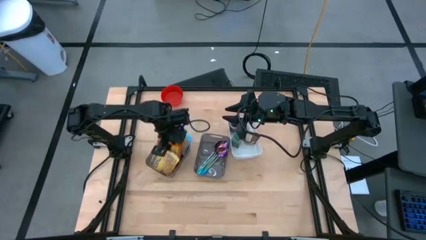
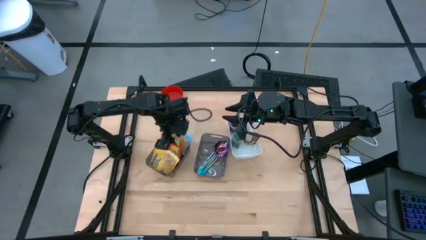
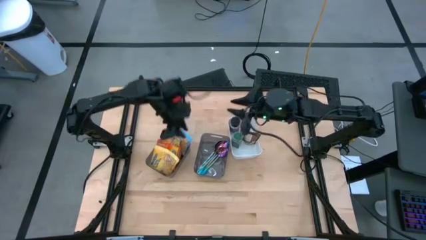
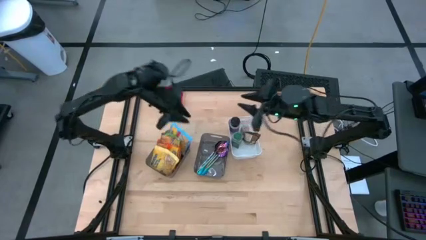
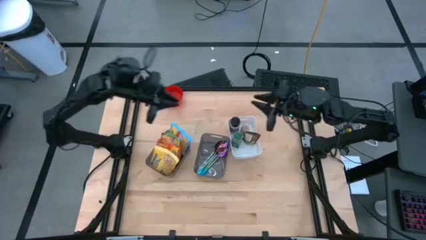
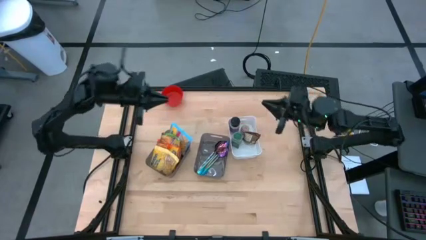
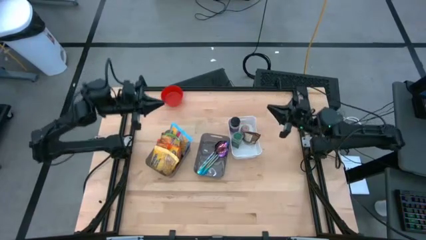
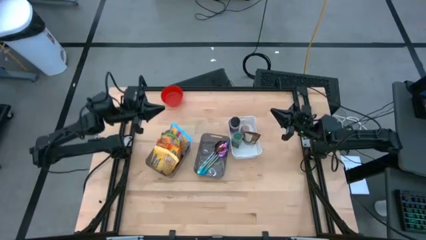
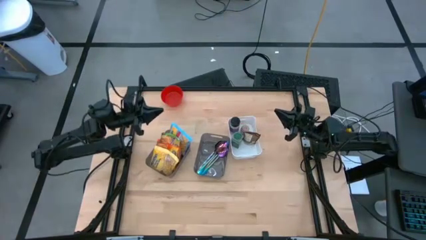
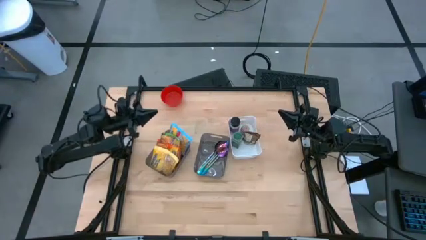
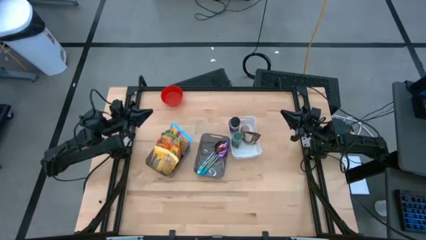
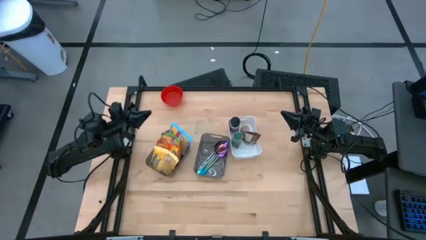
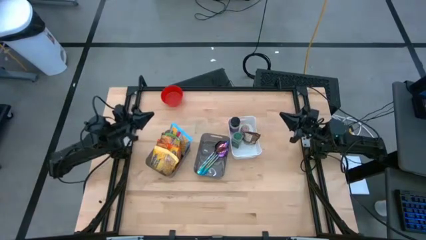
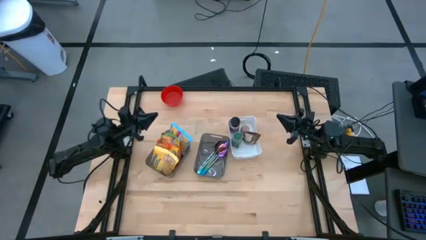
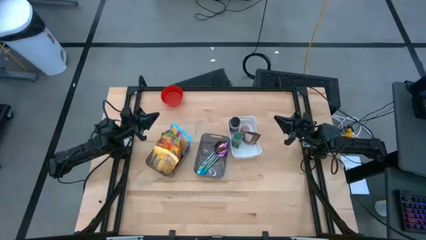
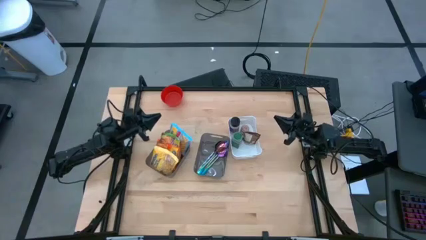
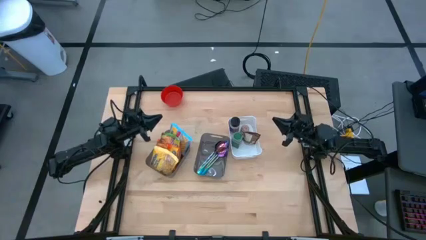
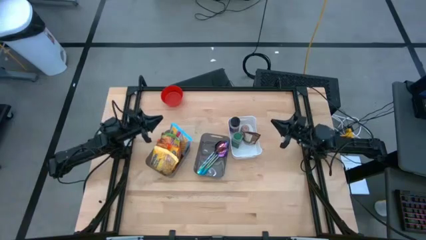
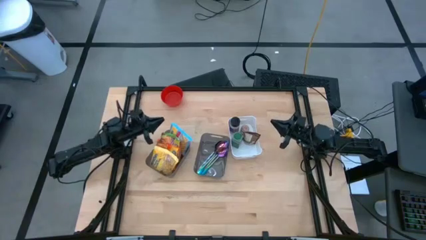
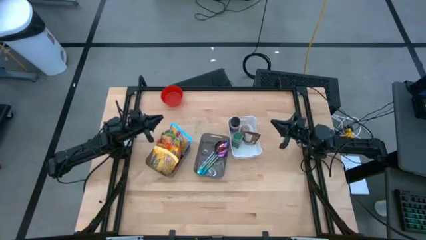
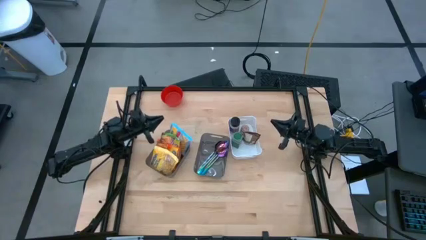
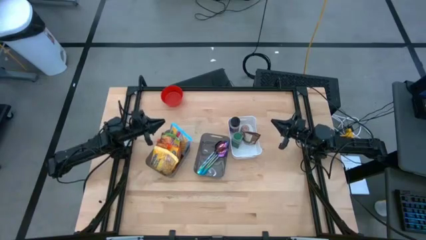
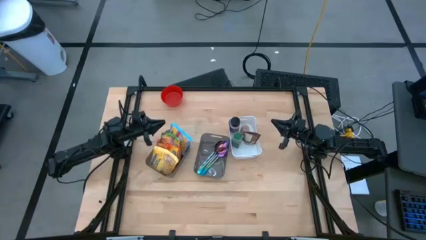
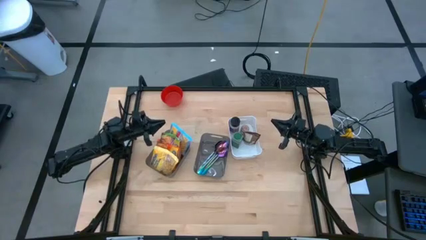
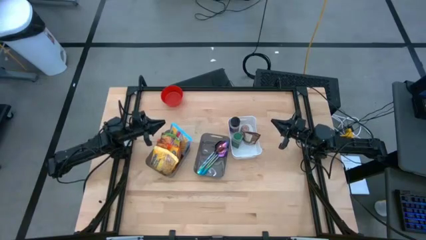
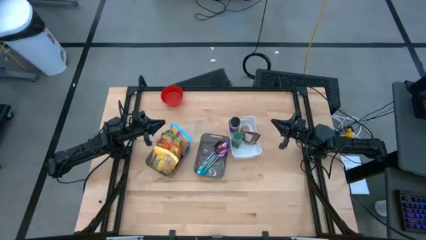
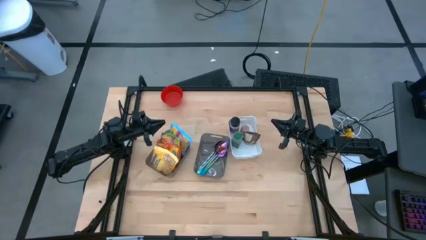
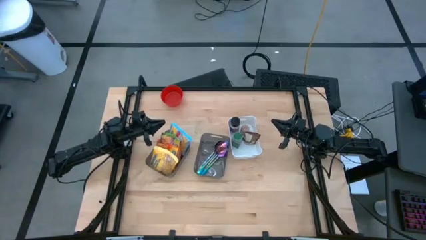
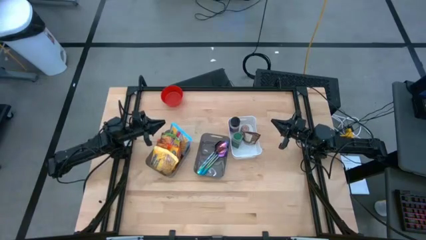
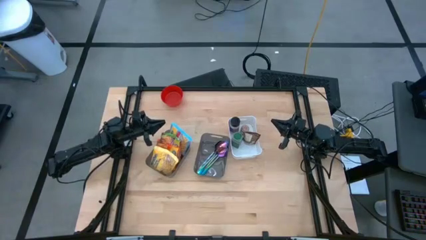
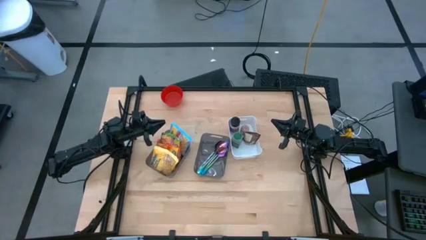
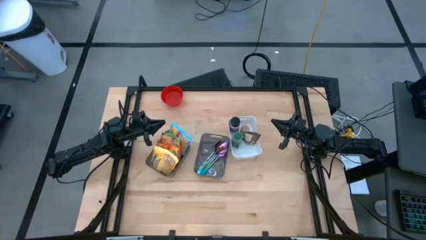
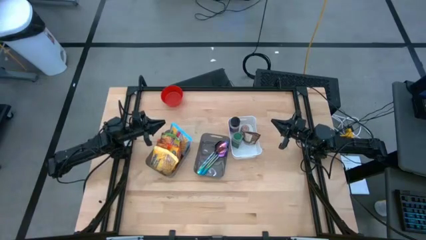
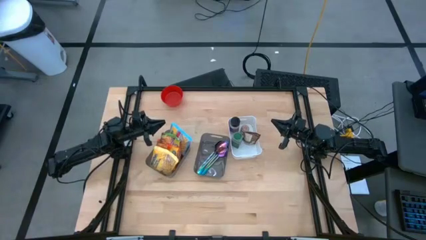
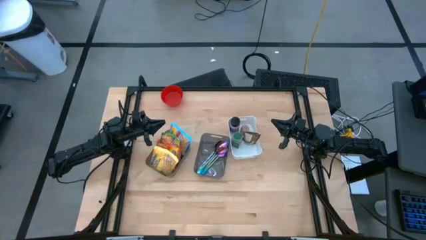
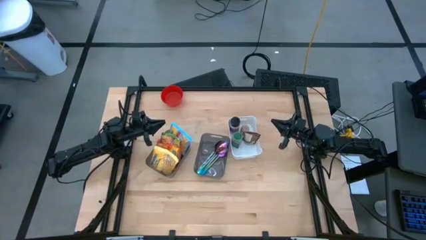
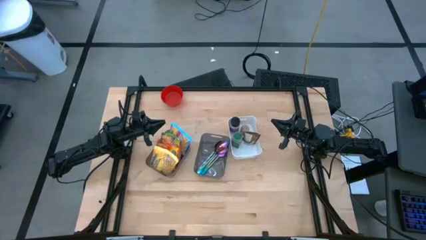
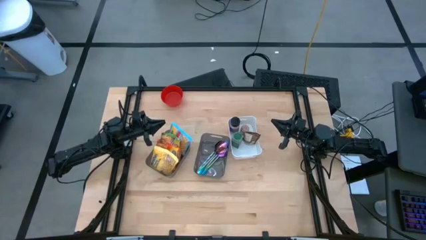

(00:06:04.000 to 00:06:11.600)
Task: Pick & Place Food Item
Return to Home Position

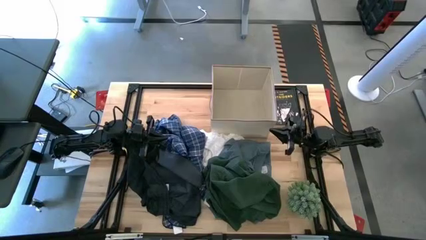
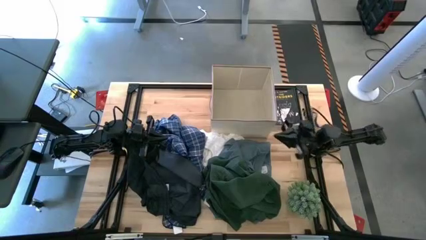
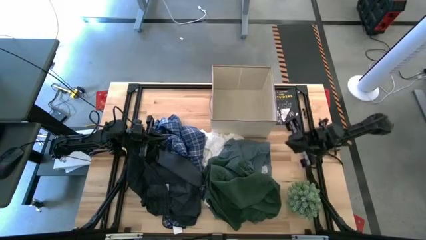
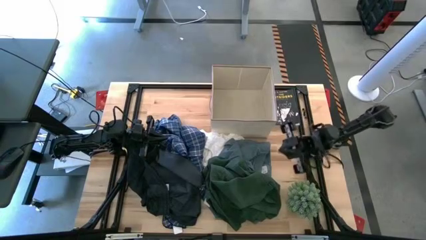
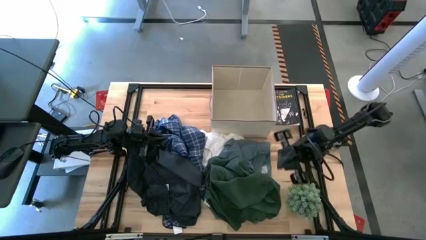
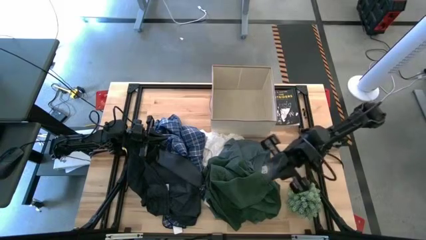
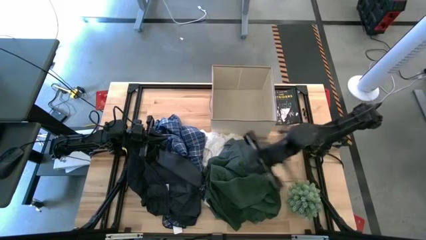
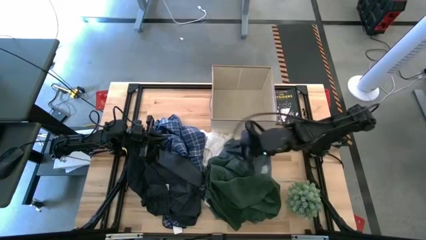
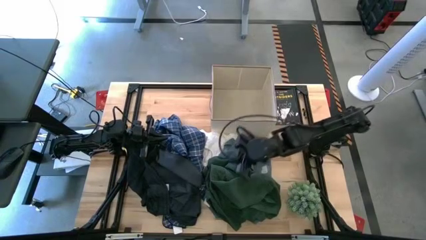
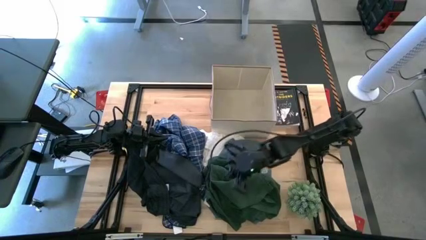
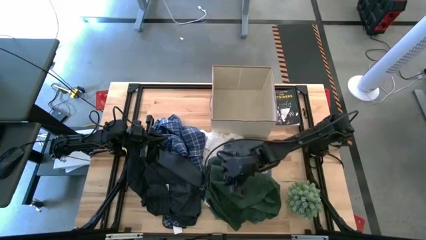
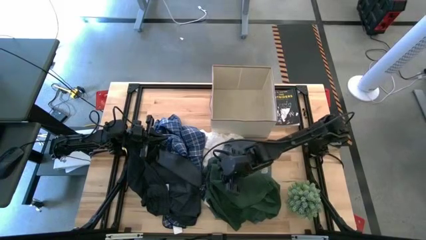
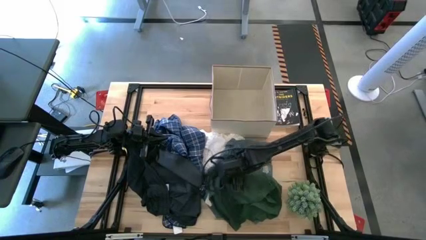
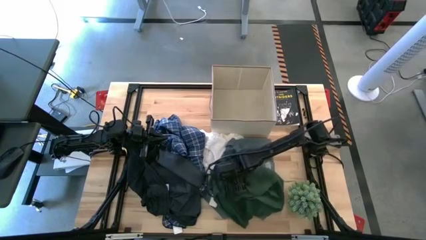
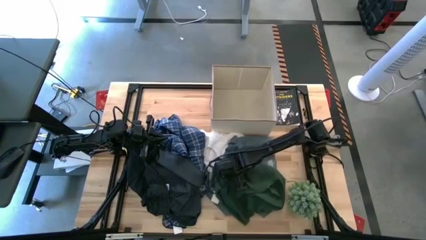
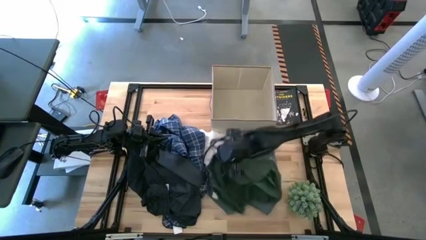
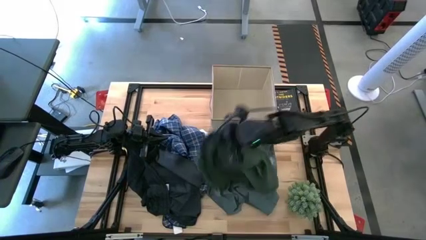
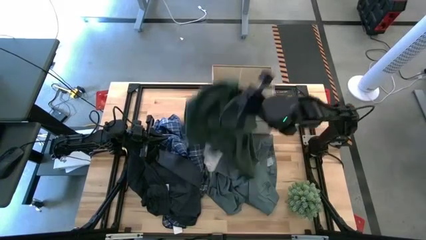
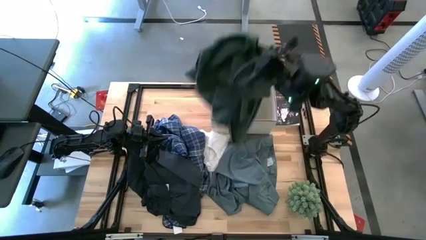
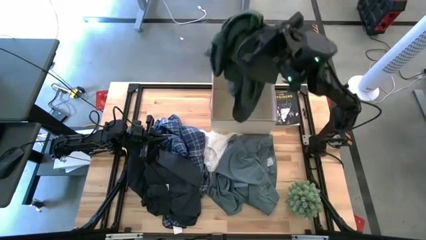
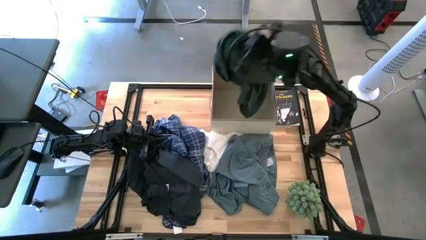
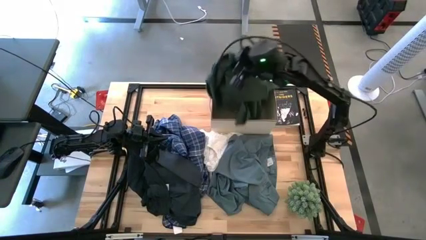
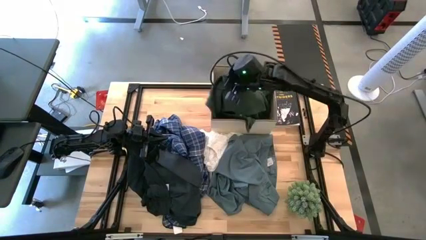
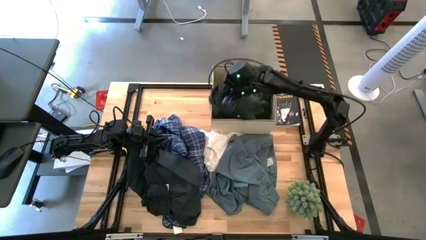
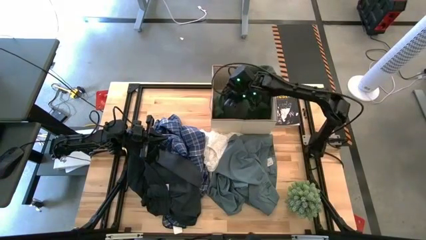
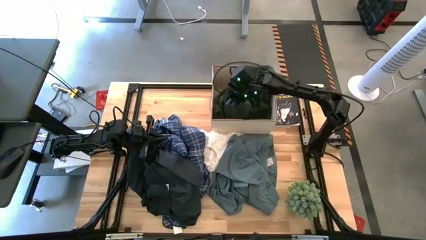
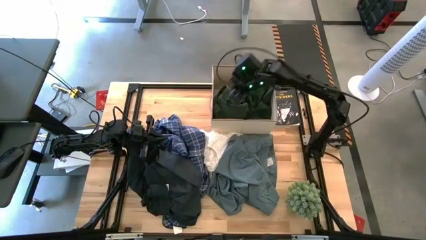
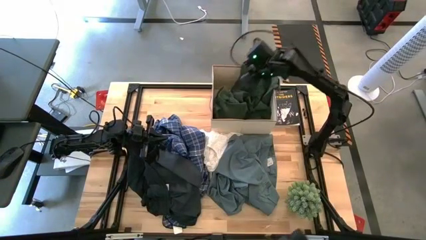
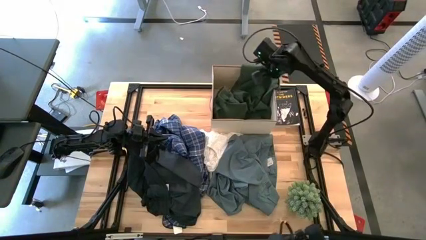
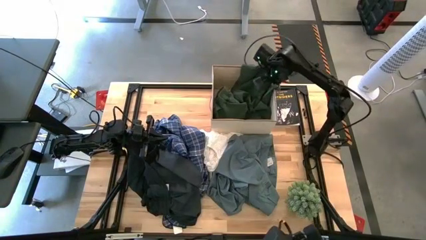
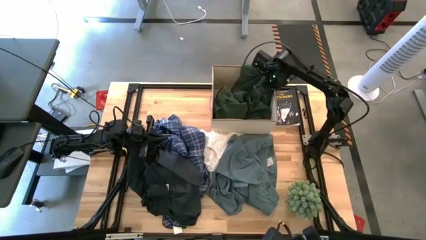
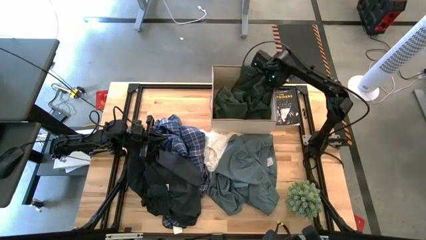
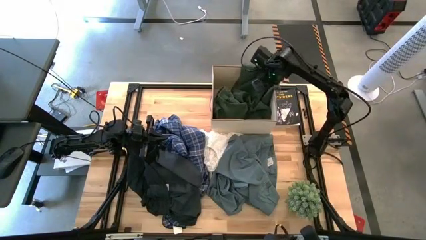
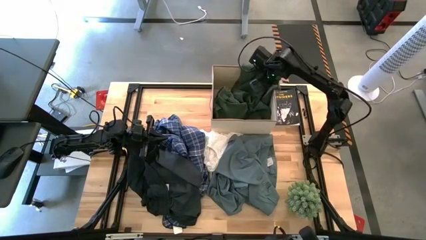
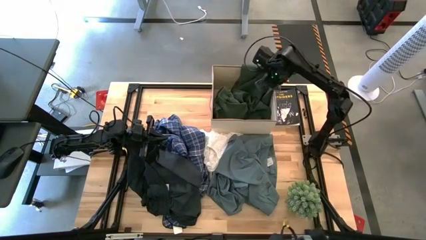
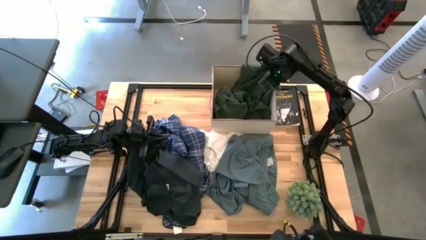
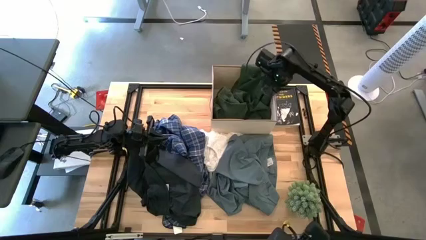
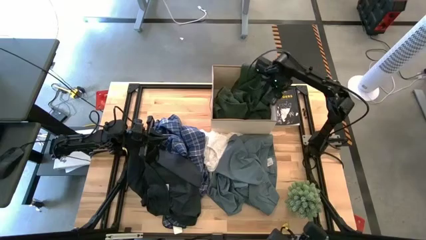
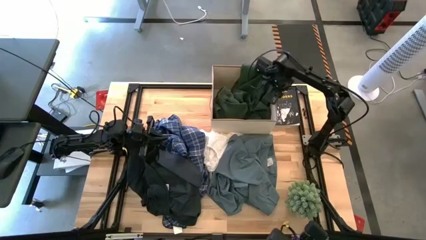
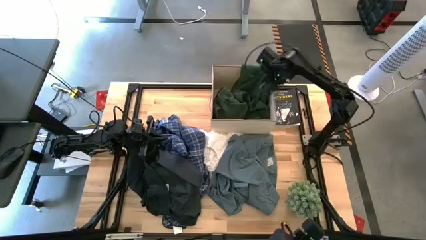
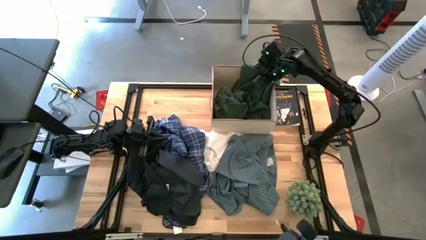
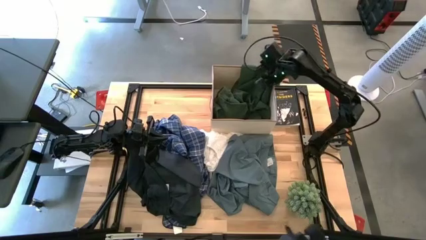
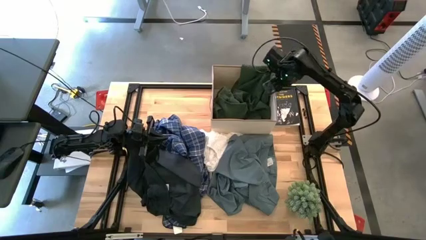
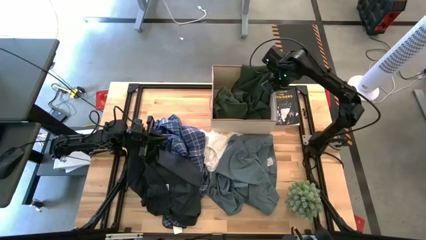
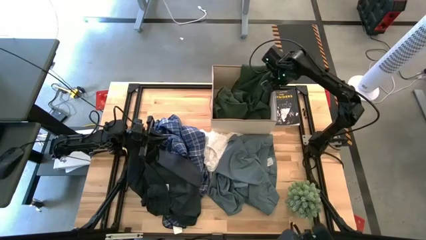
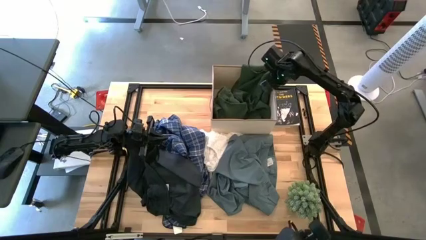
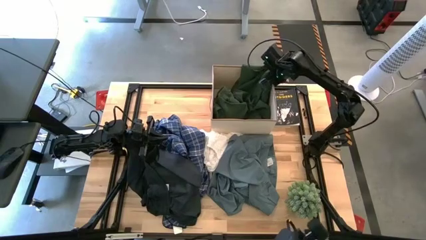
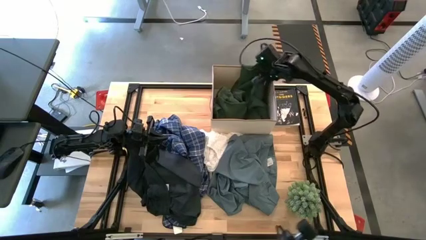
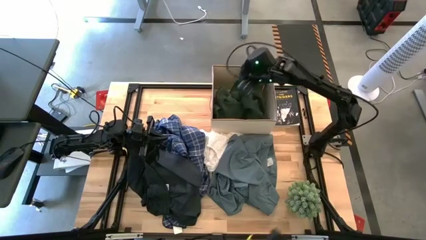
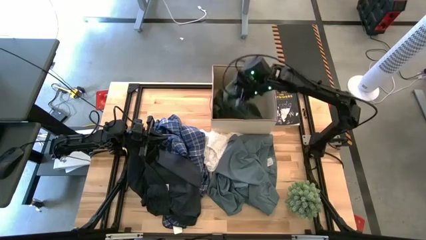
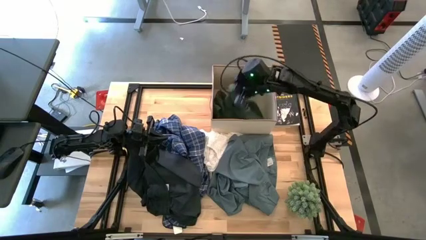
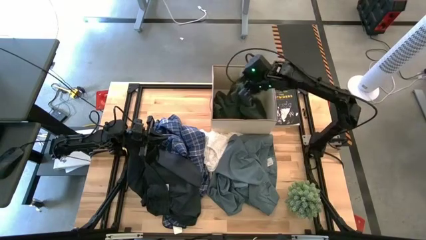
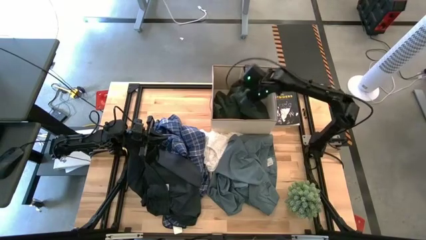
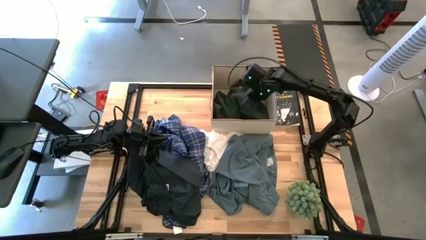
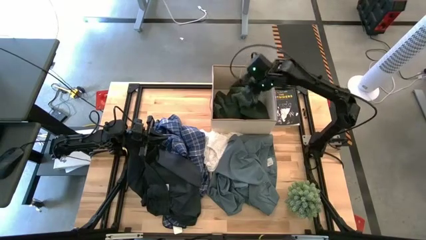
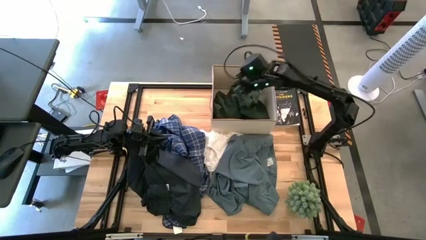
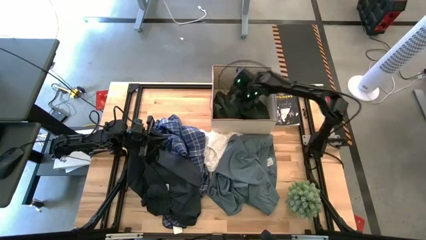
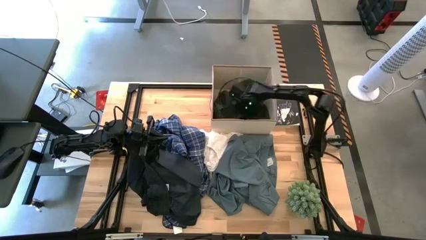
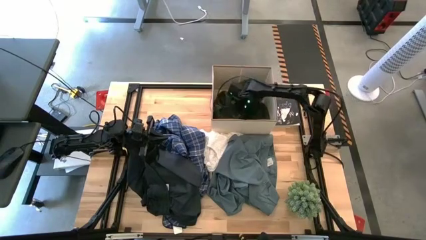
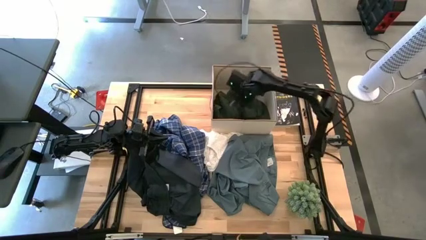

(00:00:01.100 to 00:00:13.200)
Task: Sort clothes
Put the green shirt into the laundry organizer
